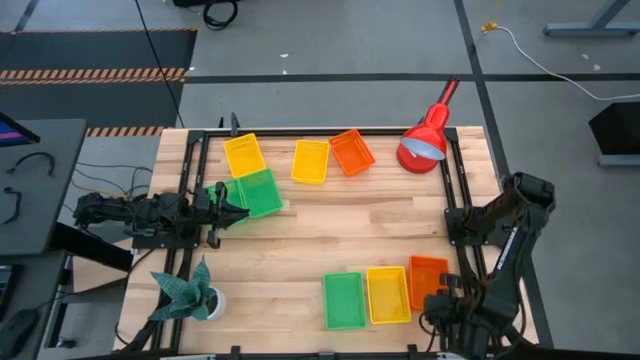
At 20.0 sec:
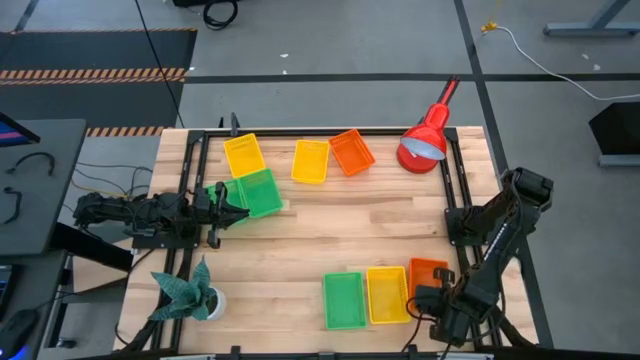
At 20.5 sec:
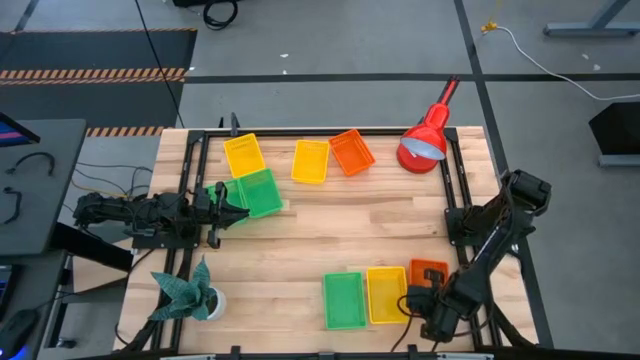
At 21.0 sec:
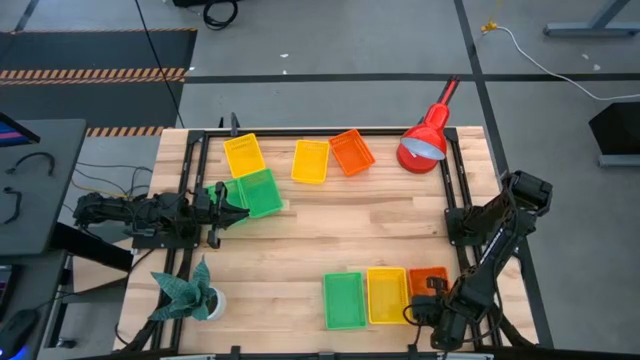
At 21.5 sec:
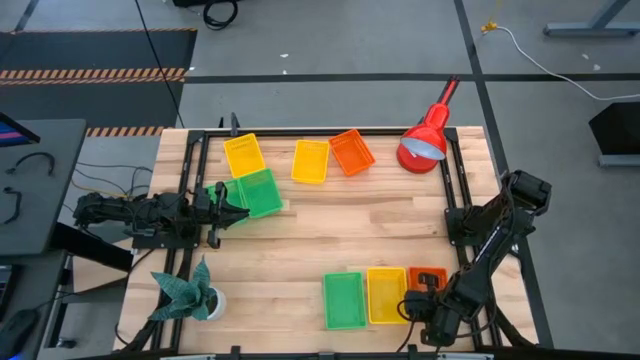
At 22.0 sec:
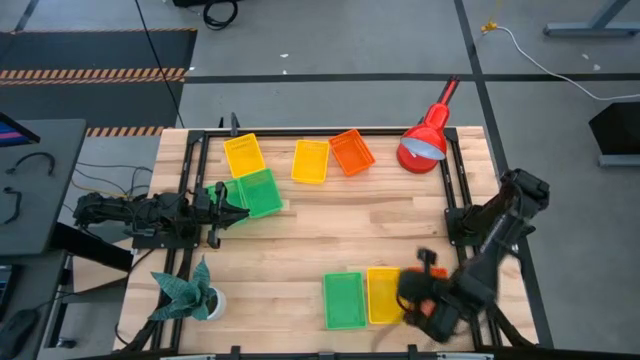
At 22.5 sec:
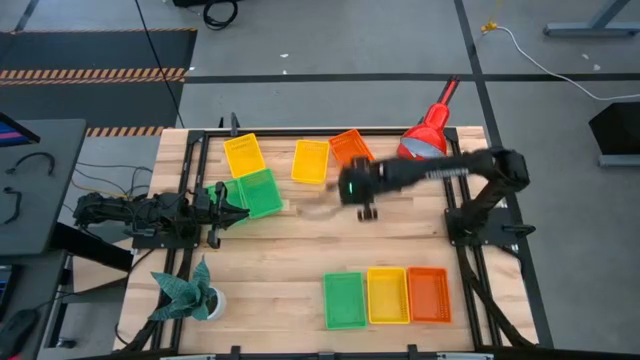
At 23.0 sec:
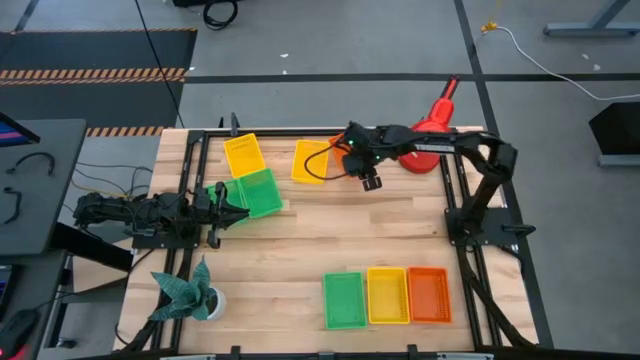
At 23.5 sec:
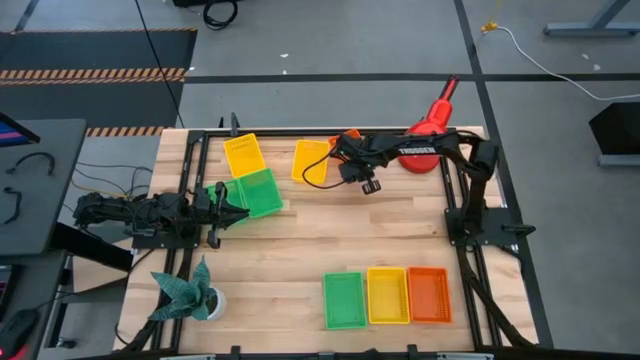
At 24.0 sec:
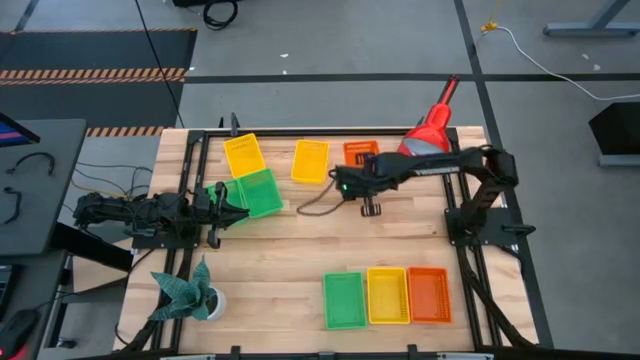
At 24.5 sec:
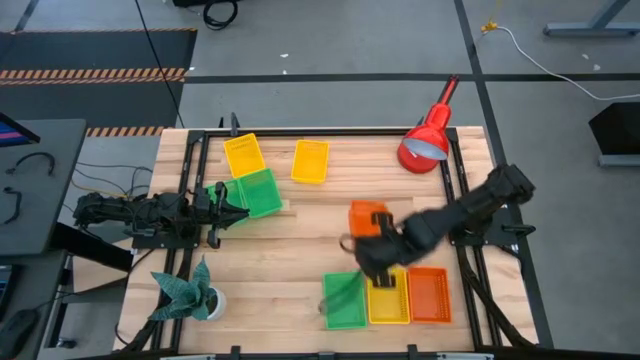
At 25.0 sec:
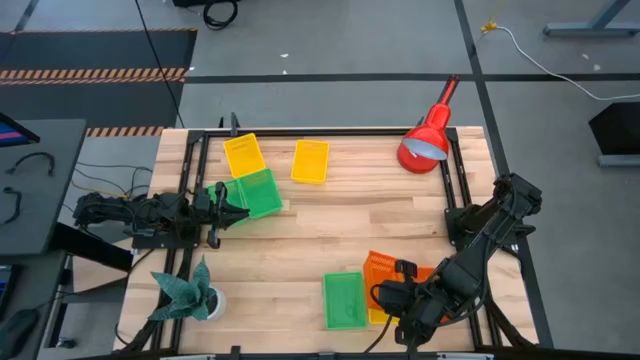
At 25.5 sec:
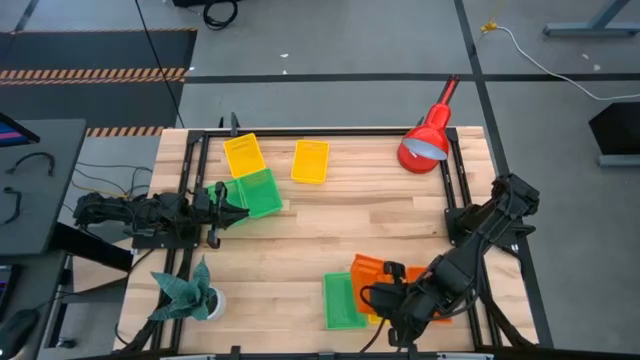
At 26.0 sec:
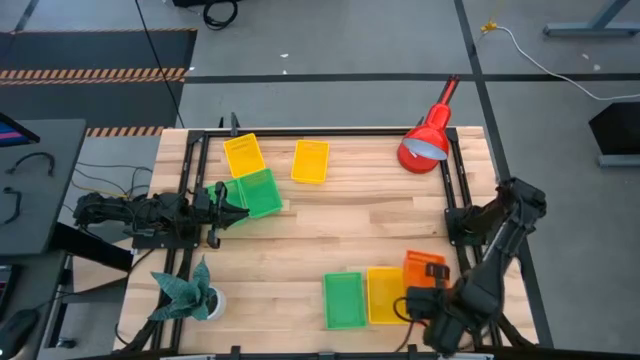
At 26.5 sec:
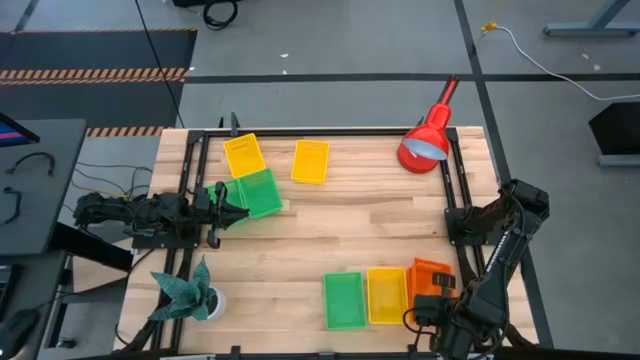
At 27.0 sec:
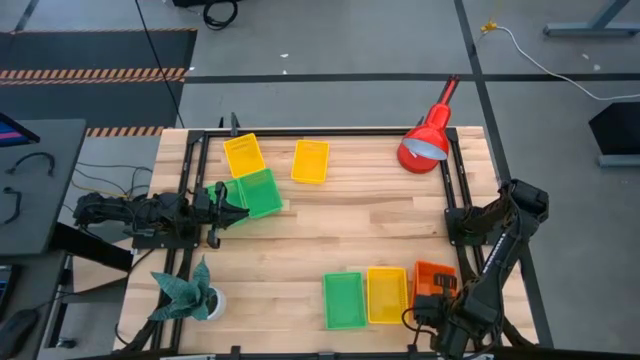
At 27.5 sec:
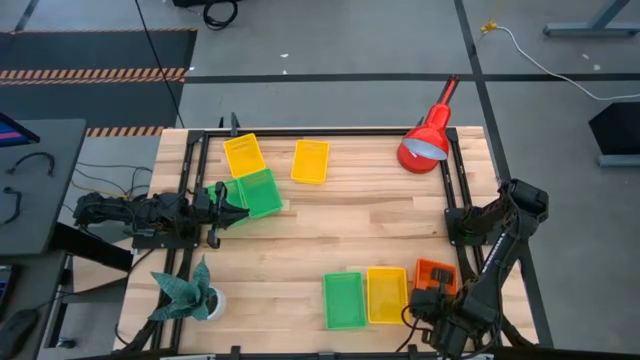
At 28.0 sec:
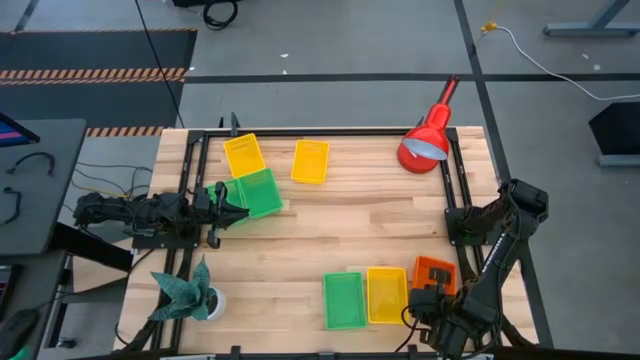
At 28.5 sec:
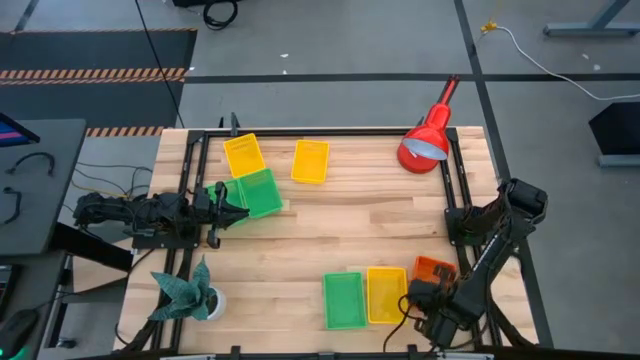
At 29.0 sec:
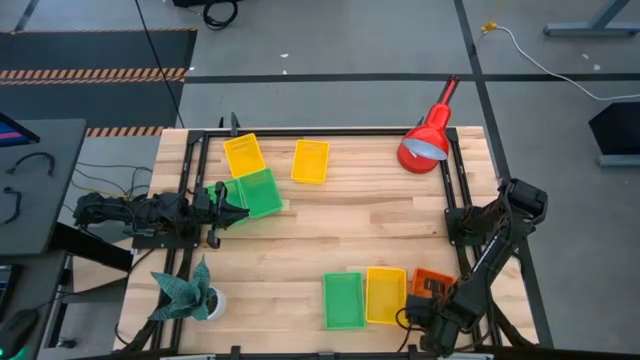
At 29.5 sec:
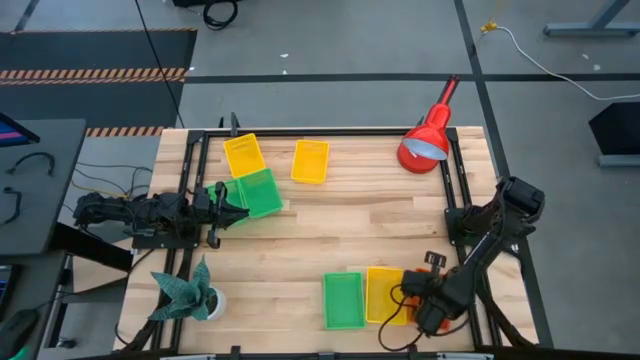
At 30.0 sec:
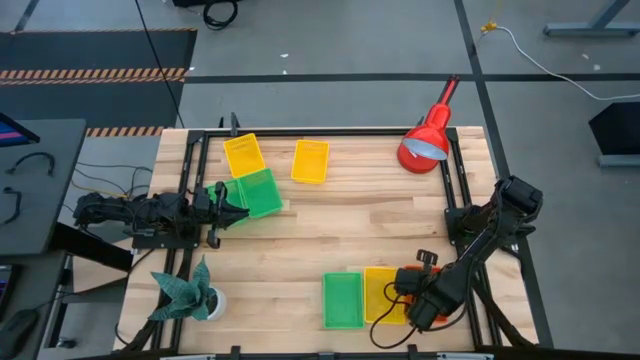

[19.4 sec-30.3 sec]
Stack the top orange basket on the bottom orange basket

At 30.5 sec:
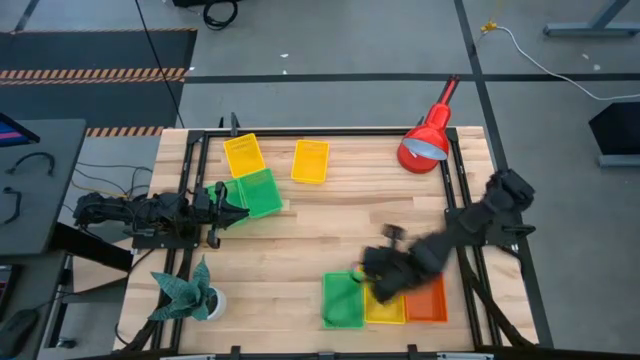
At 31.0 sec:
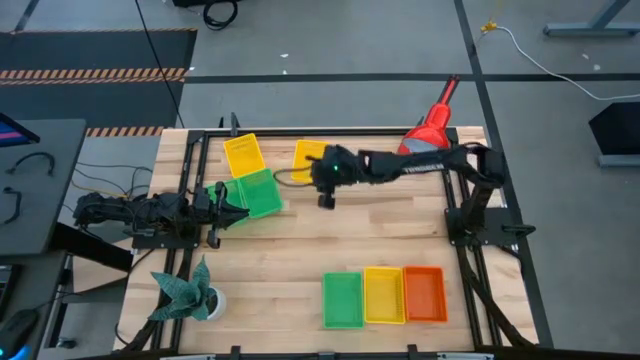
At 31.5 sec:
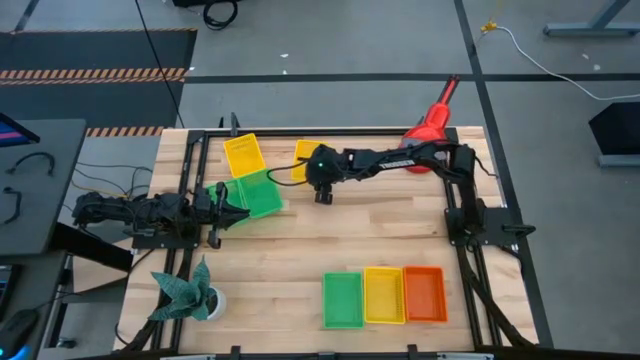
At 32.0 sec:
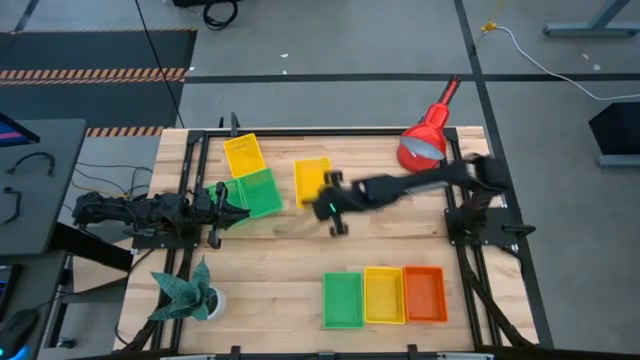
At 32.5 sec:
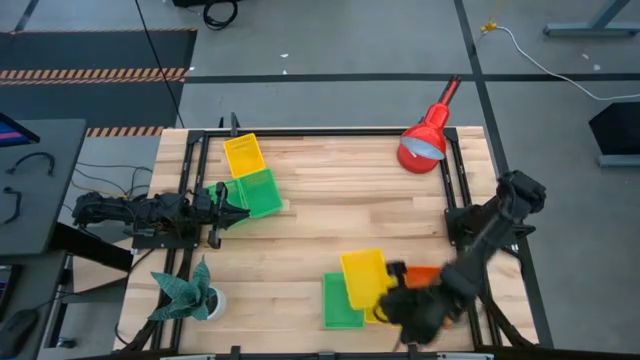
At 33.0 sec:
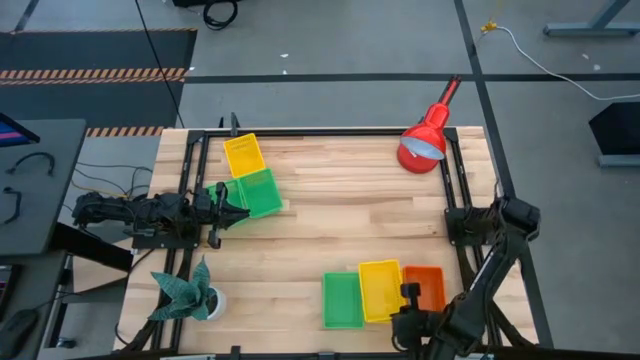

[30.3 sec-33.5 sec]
Stack the top center yellow basket on the bottom right yellow basket

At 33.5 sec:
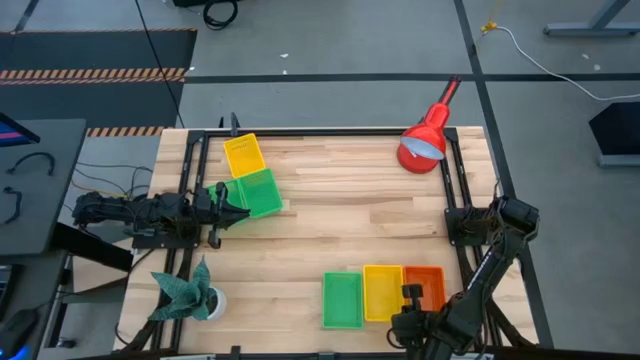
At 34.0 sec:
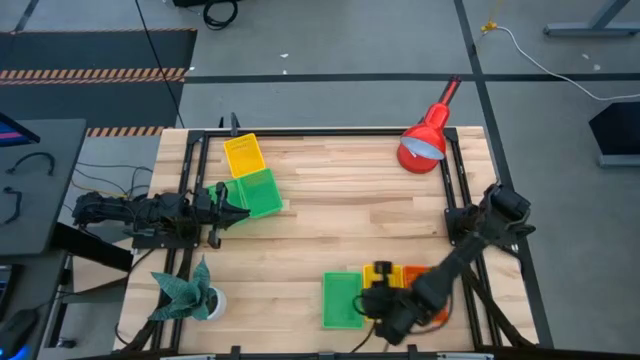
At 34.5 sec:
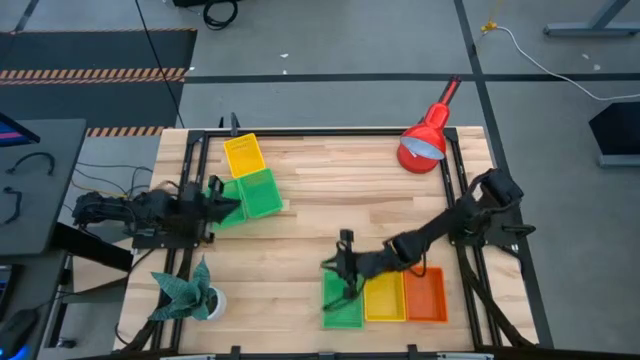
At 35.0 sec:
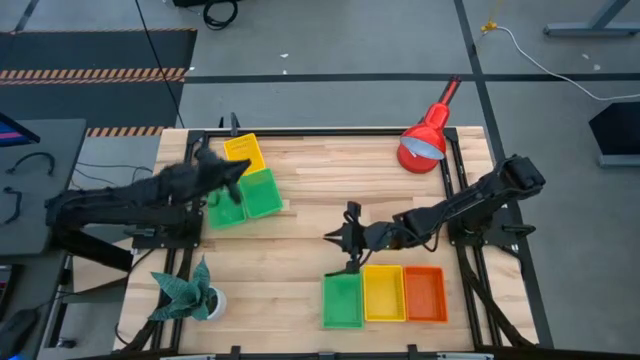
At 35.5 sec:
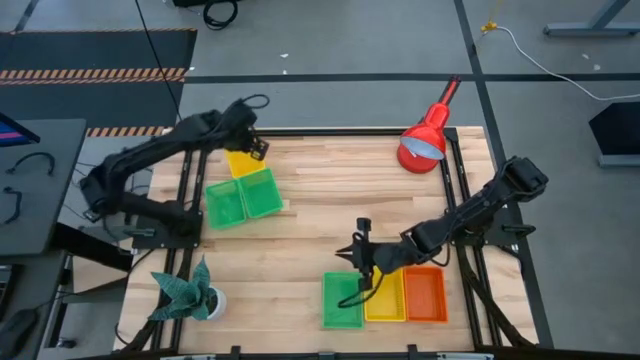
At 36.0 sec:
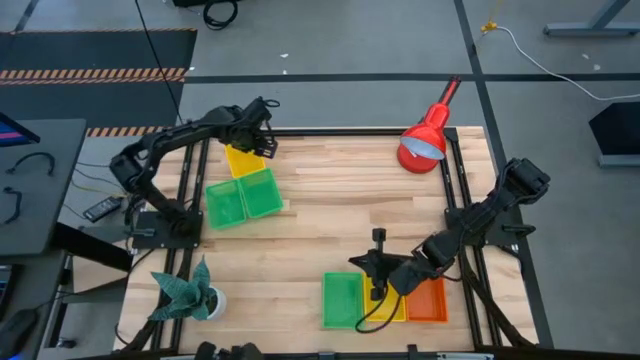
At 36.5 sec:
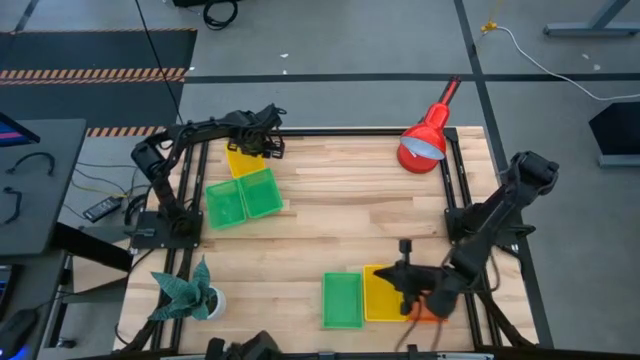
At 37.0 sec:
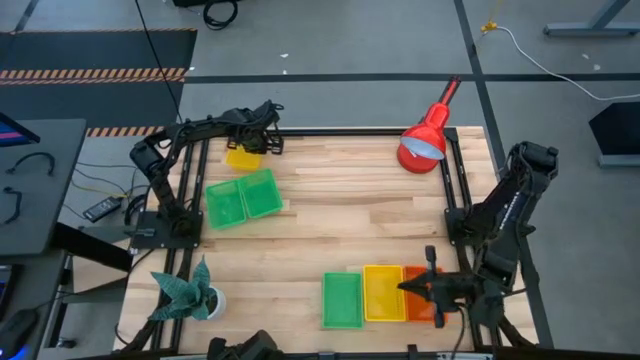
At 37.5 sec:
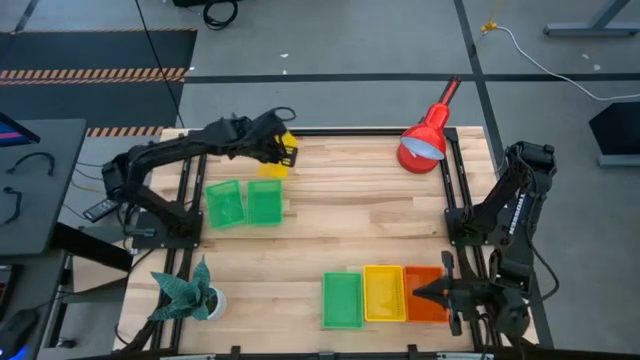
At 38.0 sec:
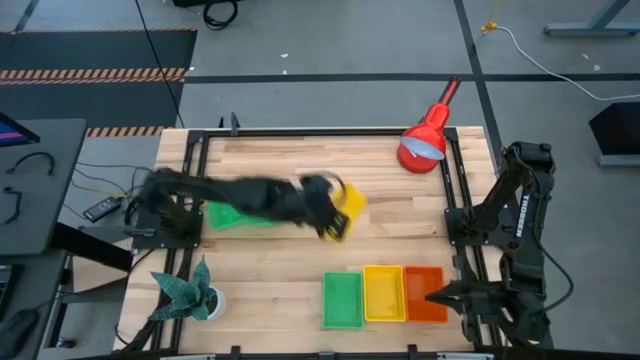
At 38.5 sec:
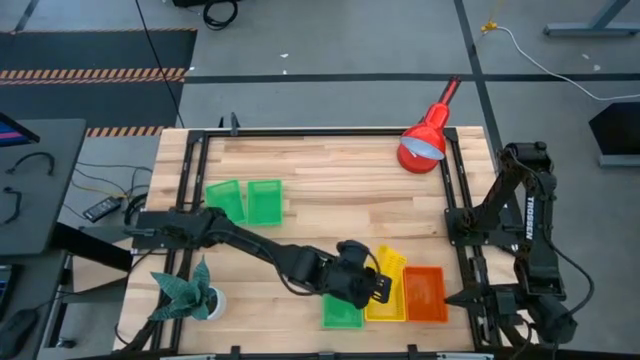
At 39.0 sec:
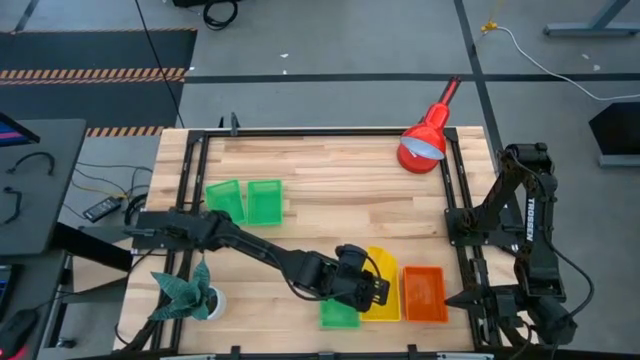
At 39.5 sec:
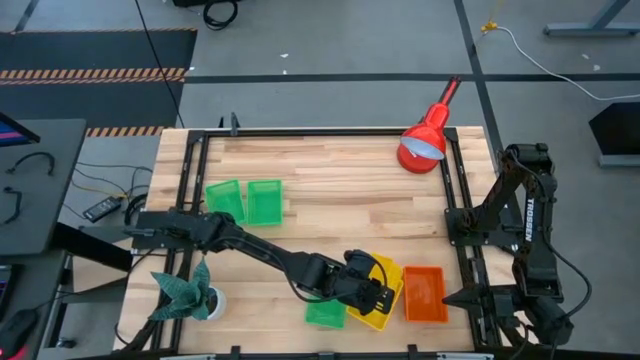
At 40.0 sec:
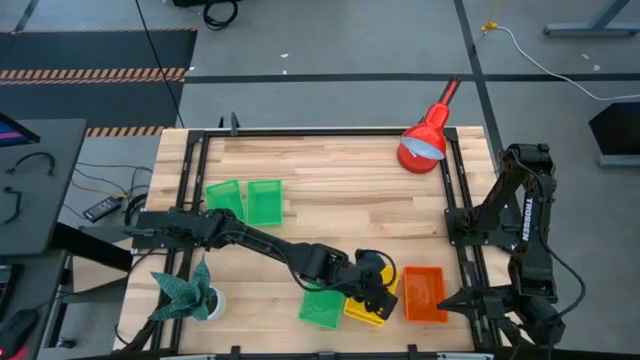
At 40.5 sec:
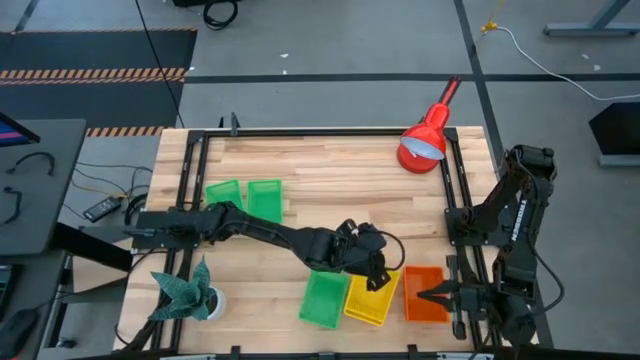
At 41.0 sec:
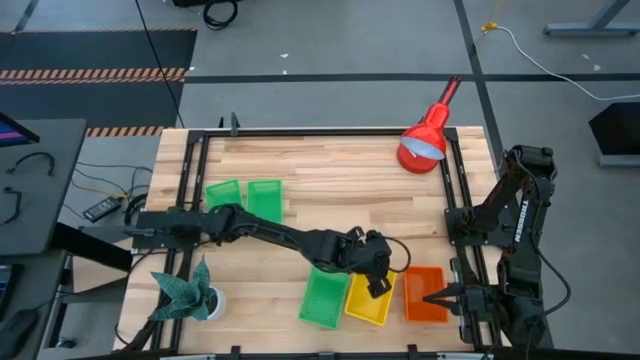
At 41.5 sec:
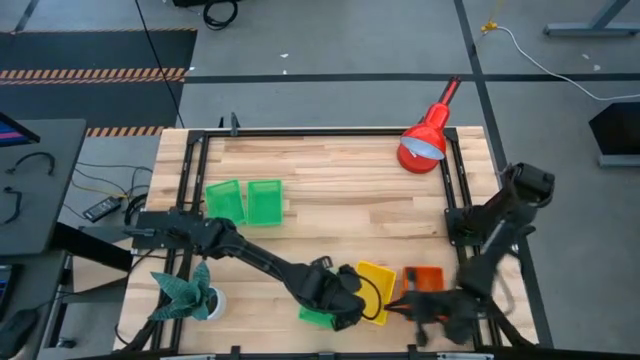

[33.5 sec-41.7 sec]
Stack the top yellow basket on the bottom yellow basket
